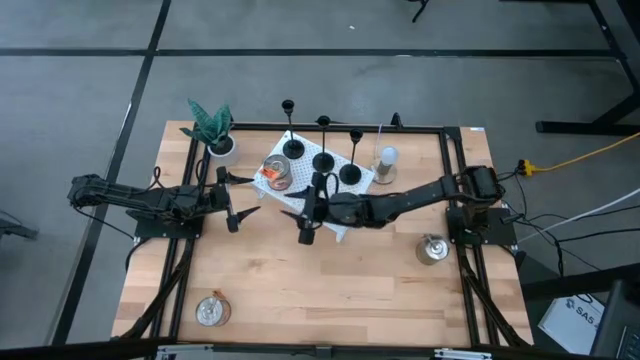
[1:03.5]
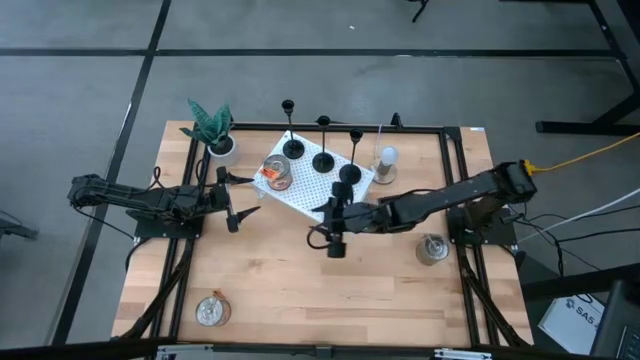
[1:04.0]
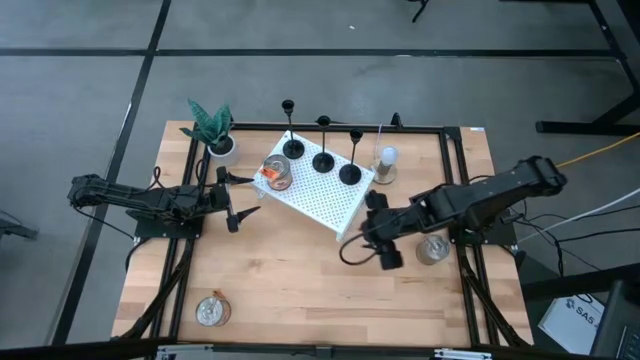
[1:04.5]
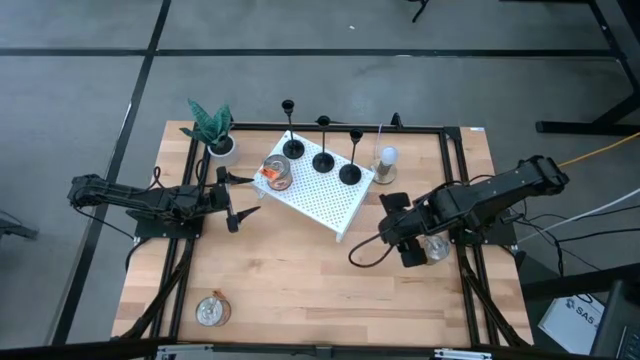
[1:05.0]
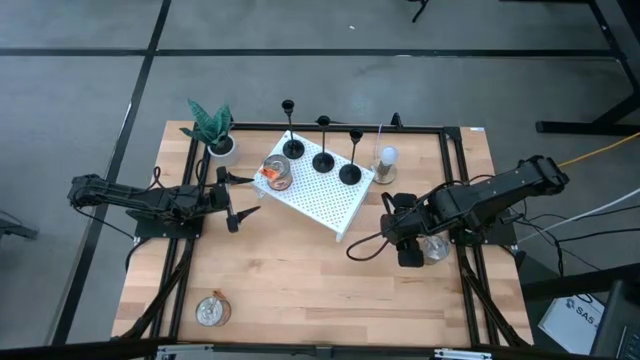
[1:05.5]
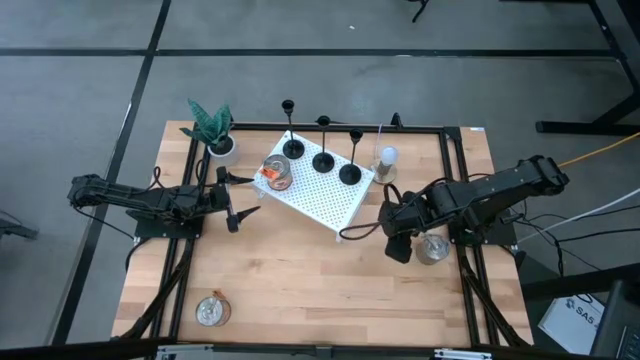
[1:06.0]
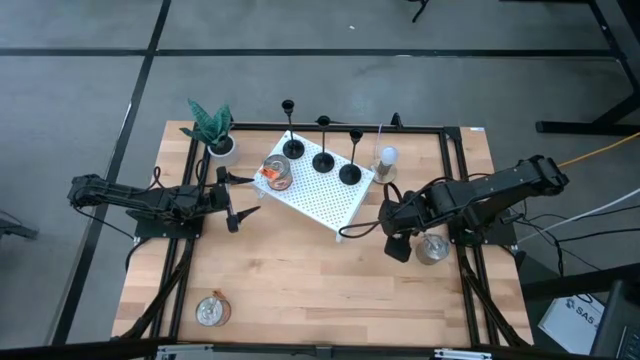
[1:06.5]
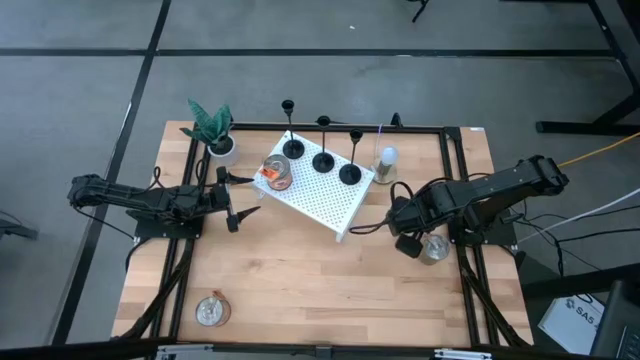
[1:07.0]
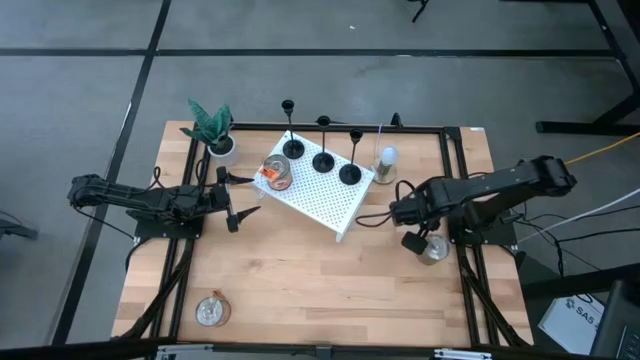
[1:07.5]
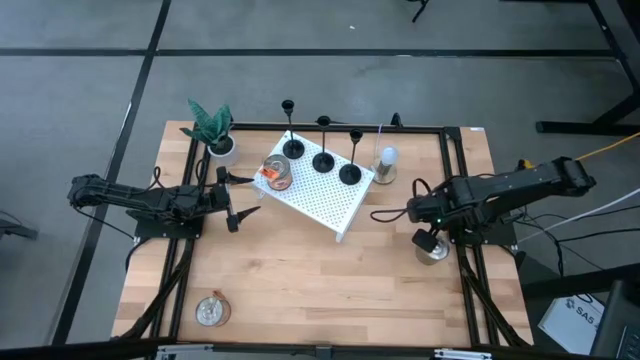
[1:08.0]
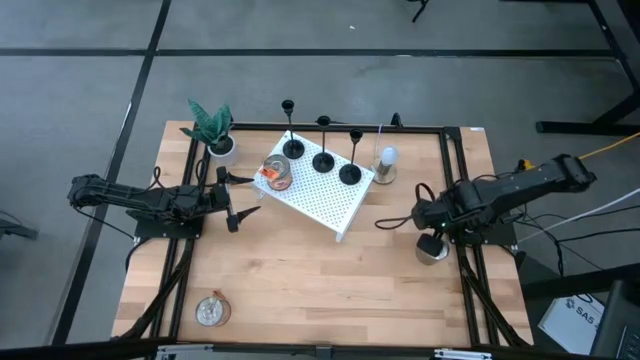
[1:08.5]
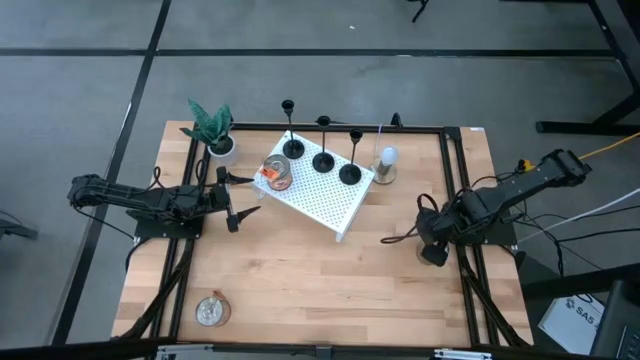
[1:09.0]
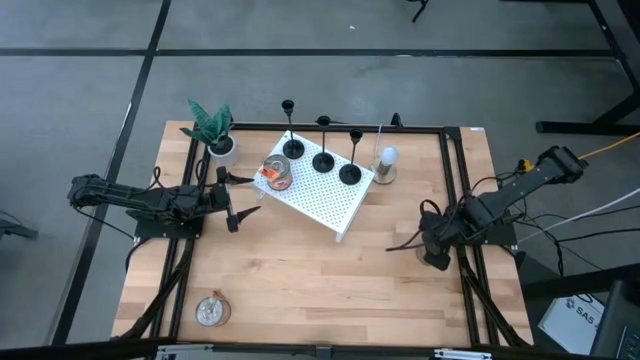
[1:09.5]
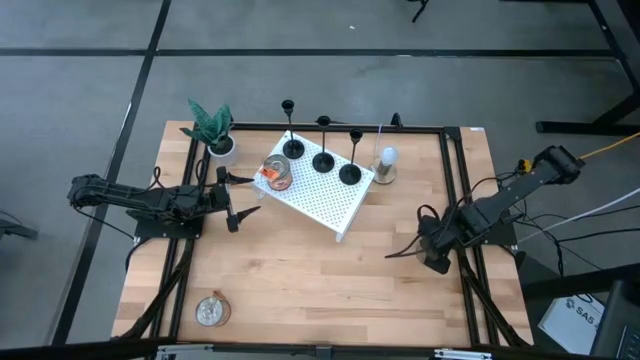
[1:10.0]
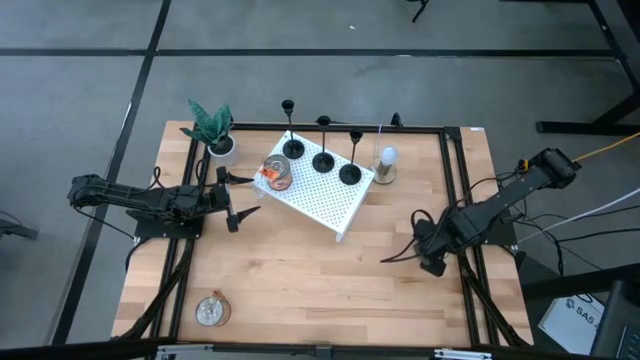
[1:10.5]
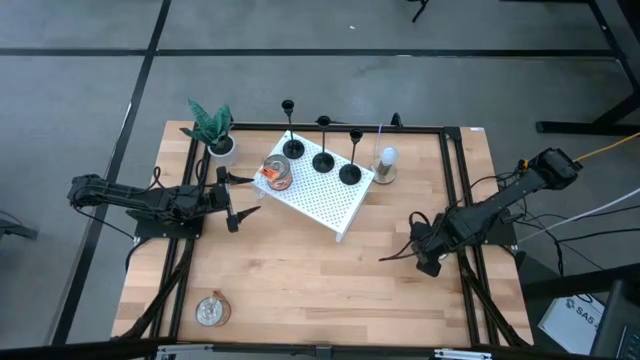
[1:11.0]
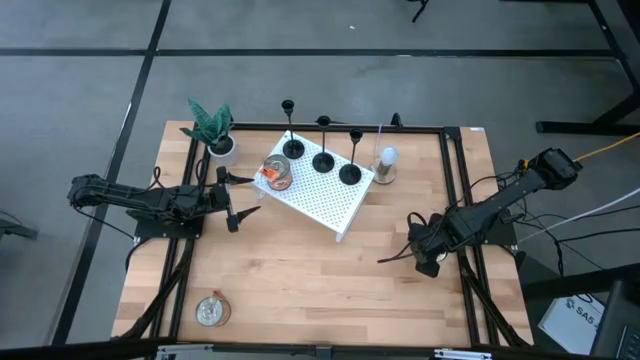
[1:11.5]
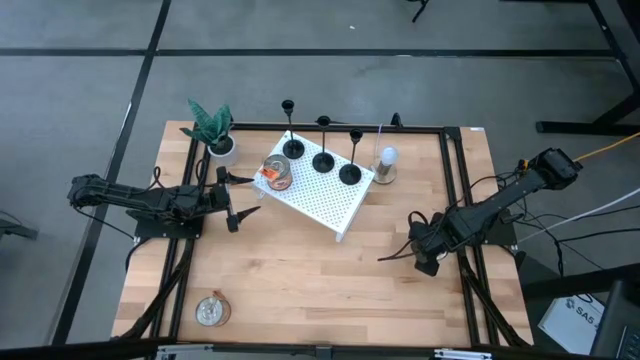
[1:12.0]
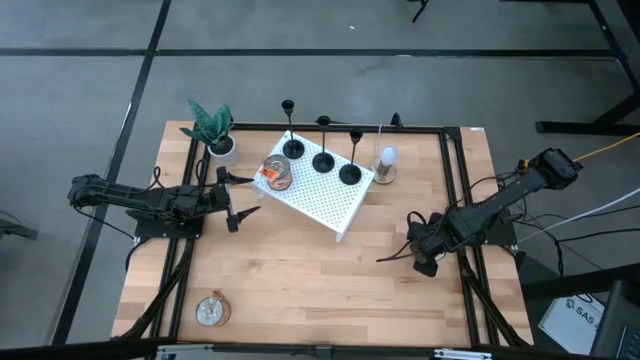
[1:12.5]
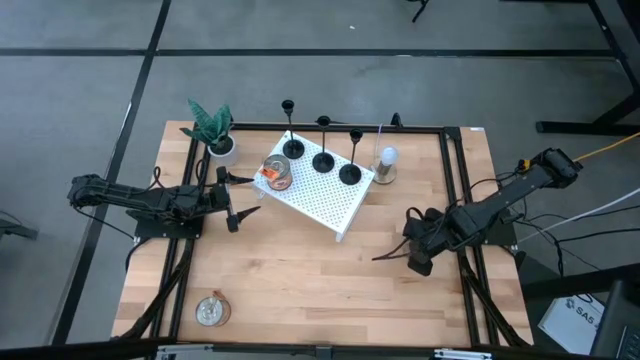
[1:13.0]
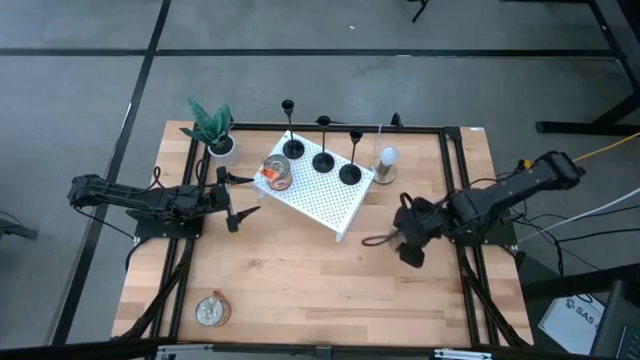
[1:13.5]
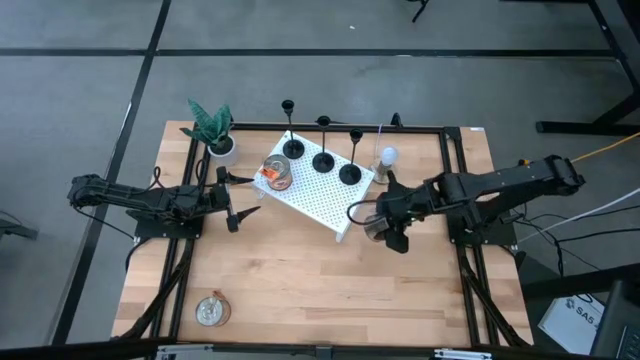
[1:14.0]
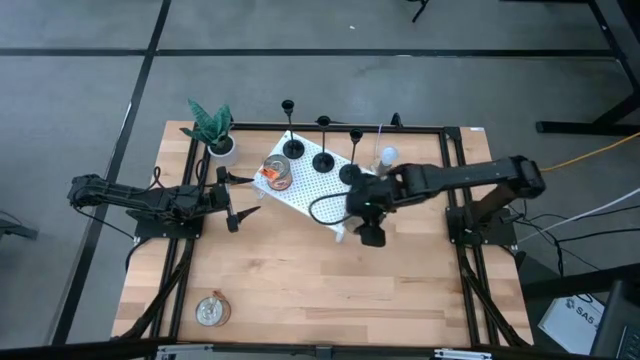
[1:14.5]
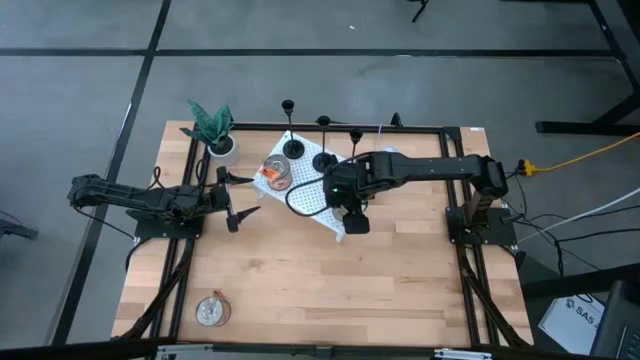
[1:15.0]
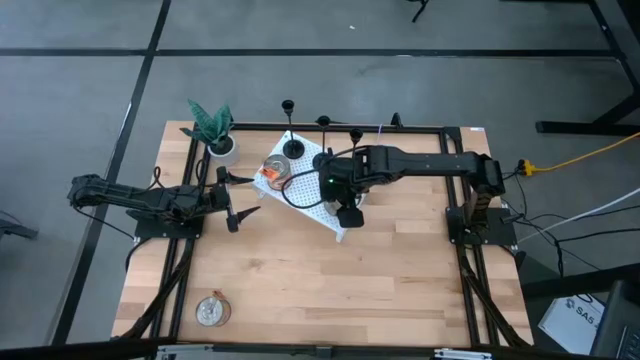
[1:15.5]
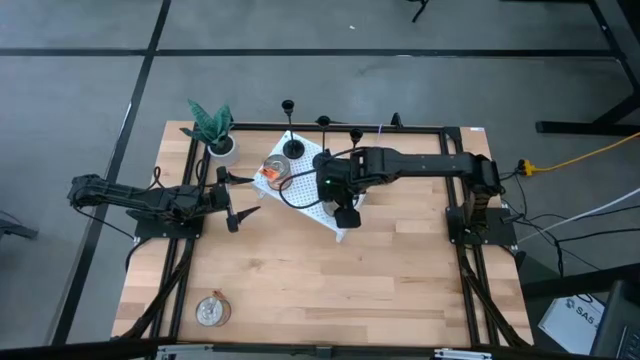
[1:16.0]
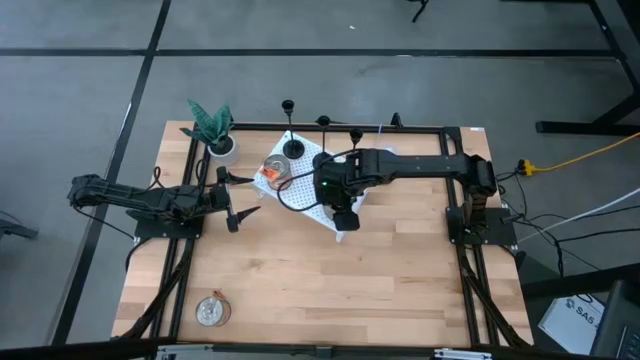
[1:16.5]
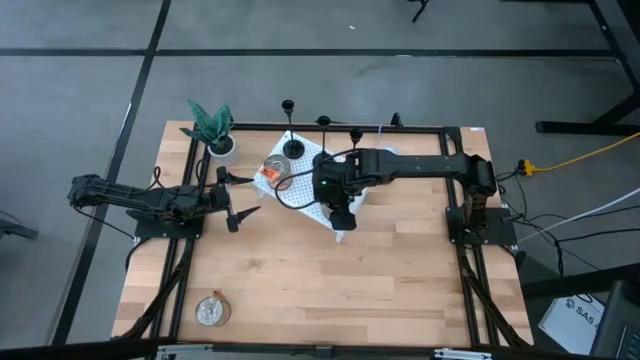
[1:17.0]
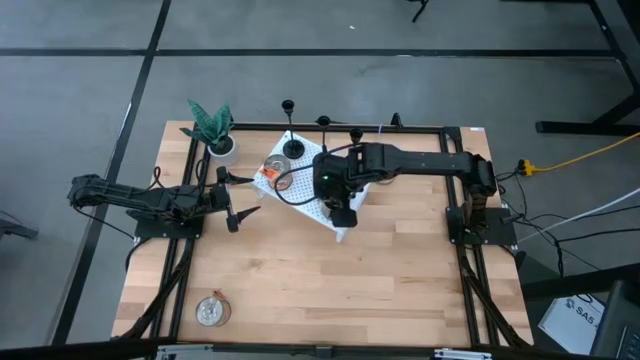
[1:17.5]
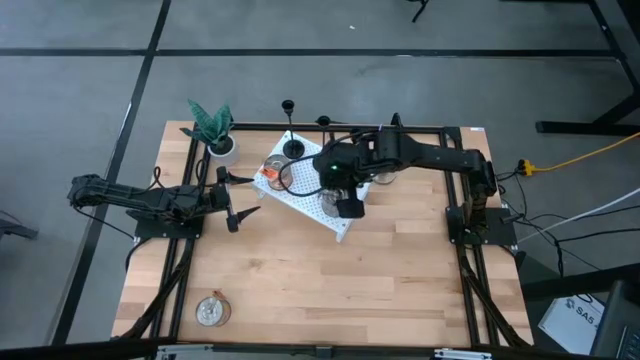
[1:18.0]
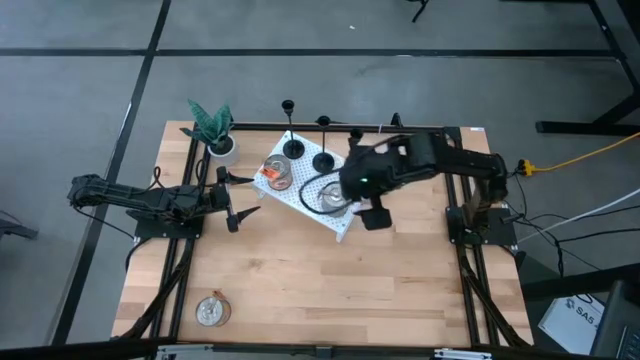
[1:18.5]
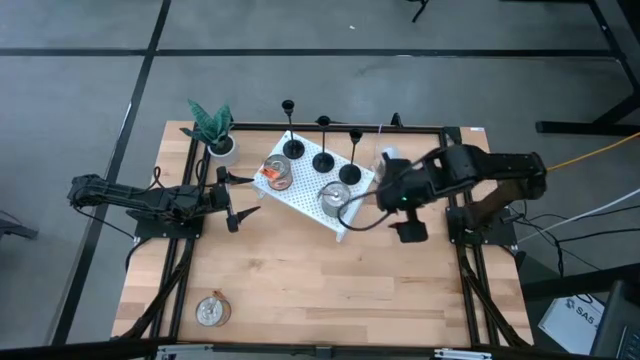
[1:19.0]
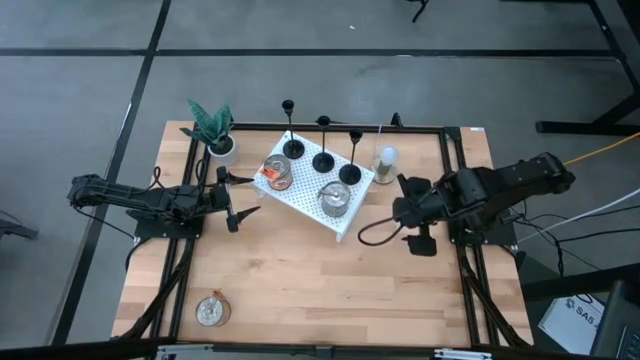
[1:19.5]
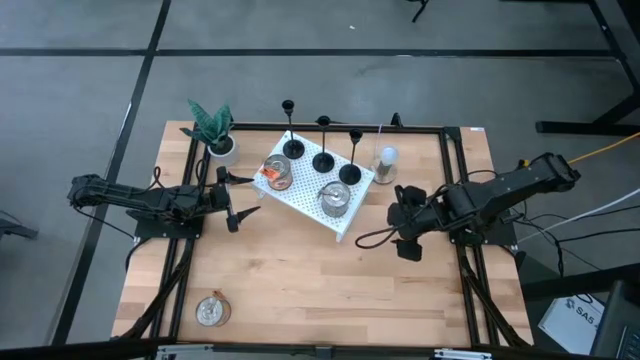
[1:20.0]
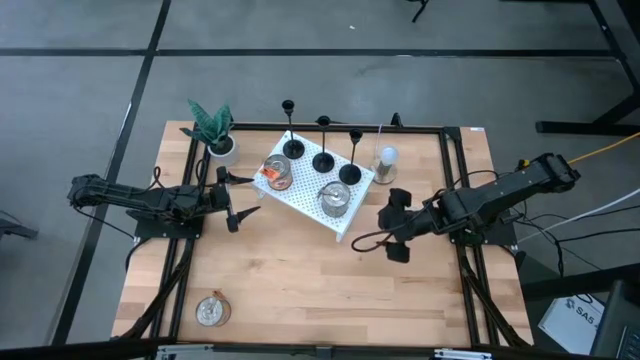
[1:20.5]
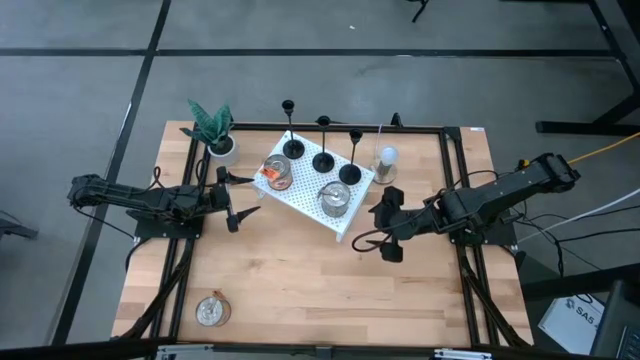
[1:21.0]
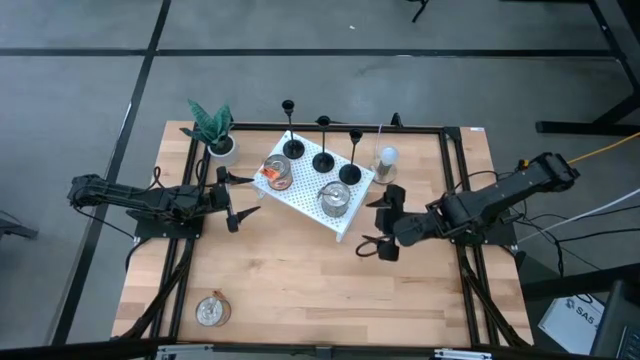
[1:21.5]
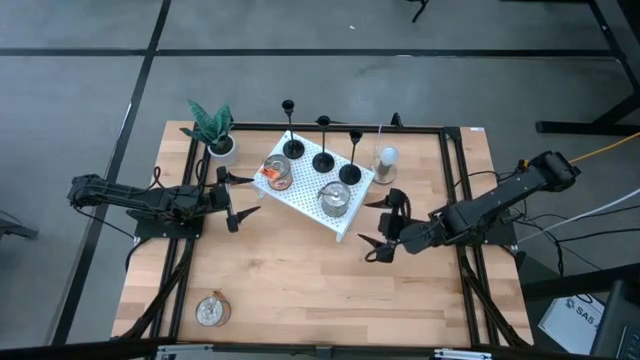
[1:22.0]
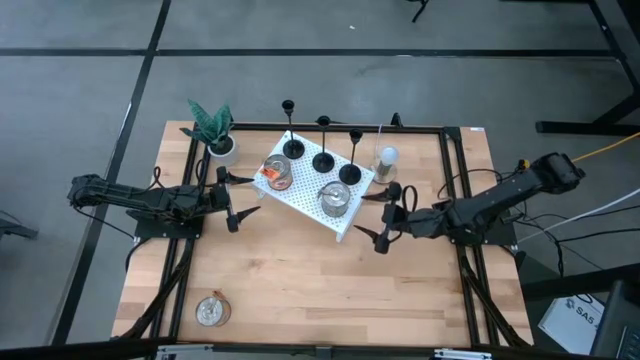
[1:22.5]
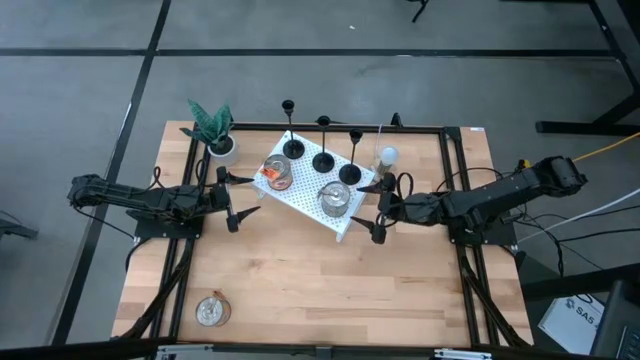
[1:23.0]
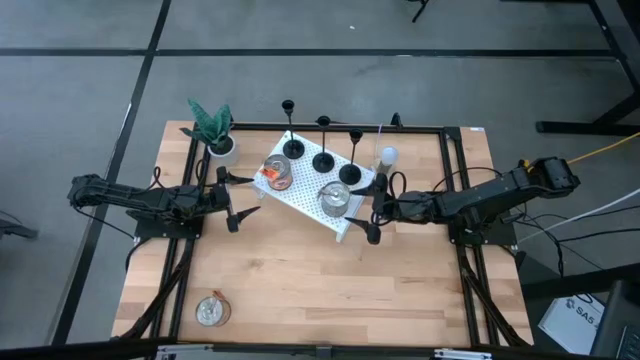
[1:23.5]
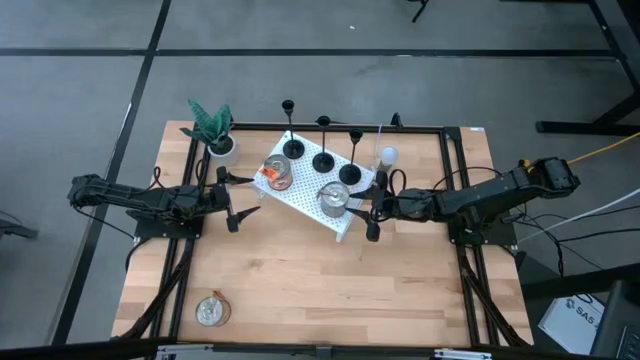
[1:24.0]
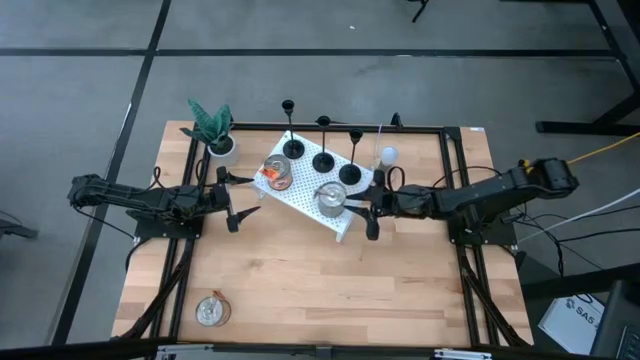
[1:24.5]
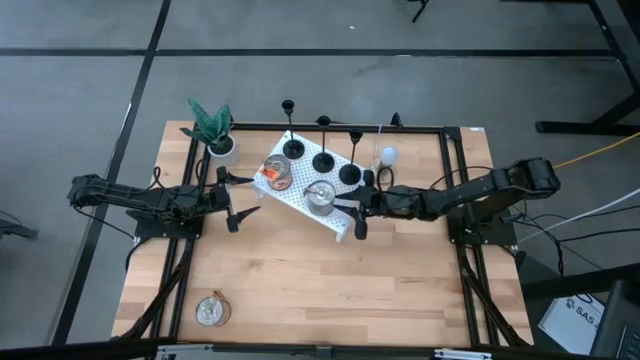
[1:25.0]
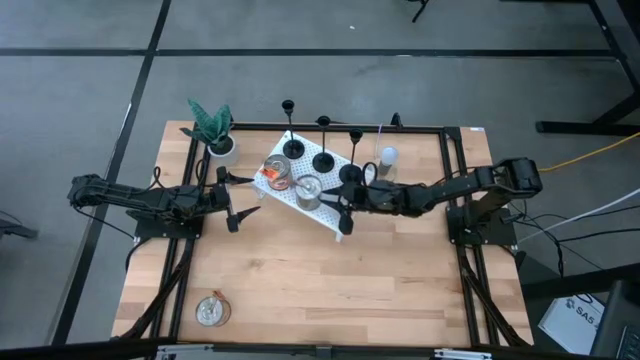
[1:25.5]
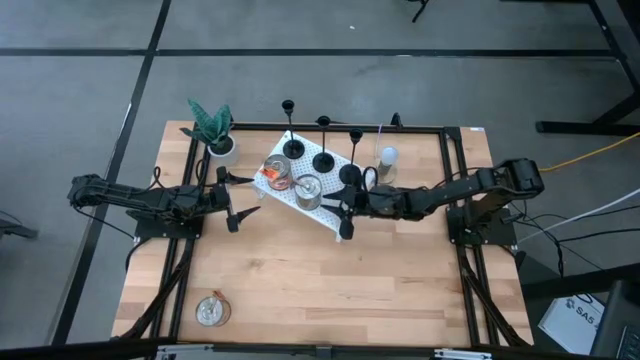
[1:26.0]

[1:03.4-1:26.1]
Task: Pick & Place candle stick holders
Put the brown scented candle on the shelf
